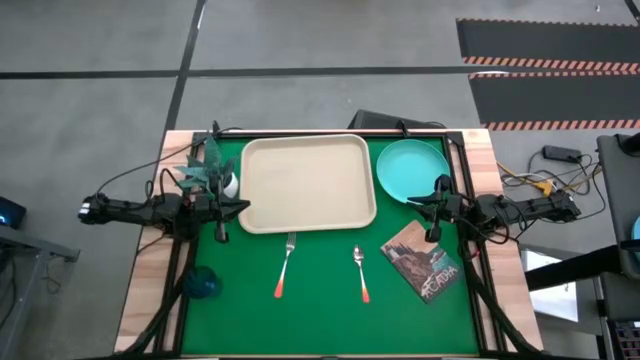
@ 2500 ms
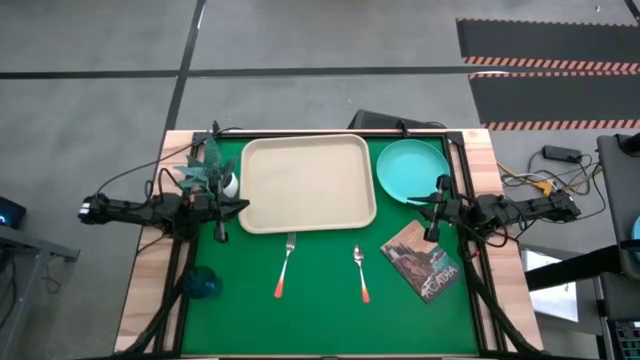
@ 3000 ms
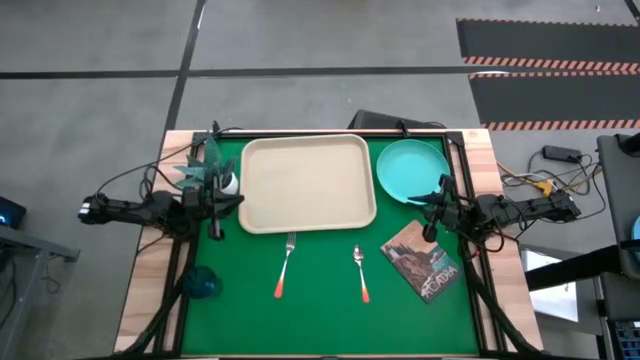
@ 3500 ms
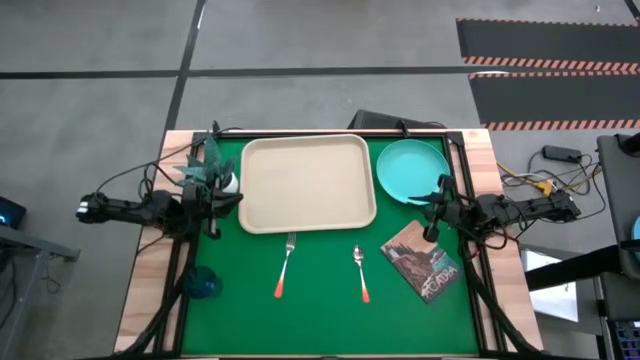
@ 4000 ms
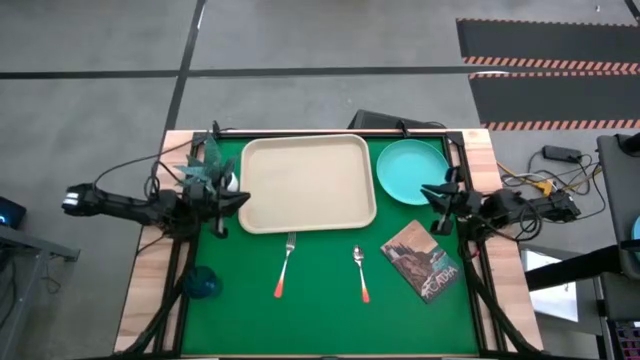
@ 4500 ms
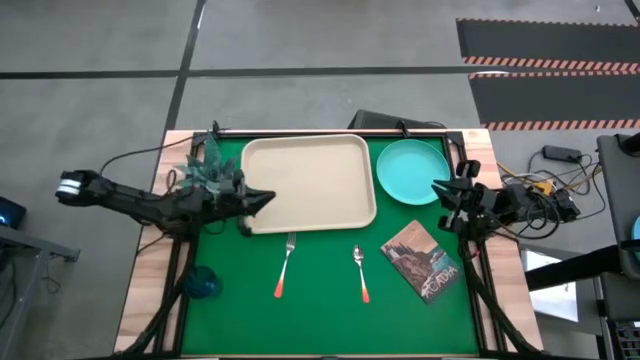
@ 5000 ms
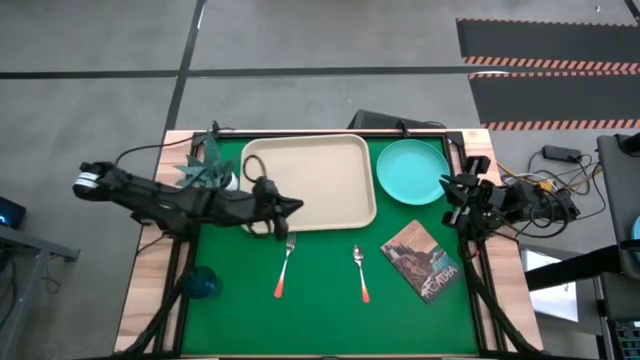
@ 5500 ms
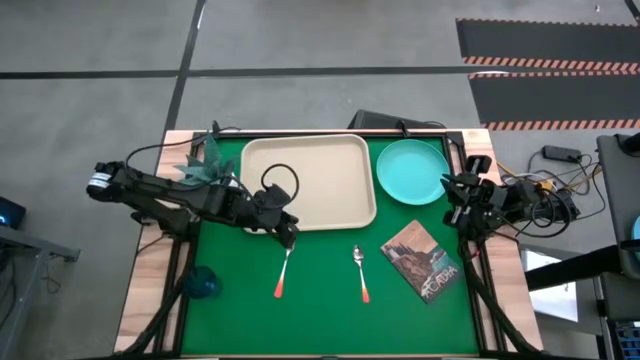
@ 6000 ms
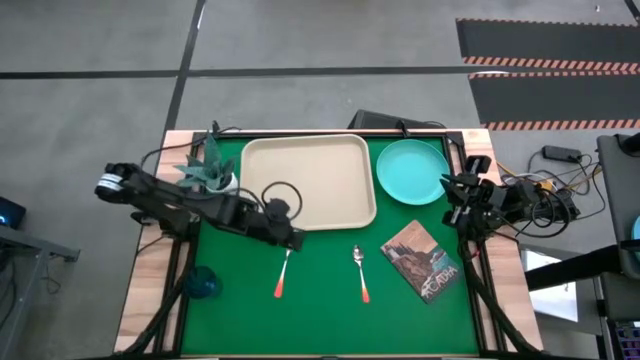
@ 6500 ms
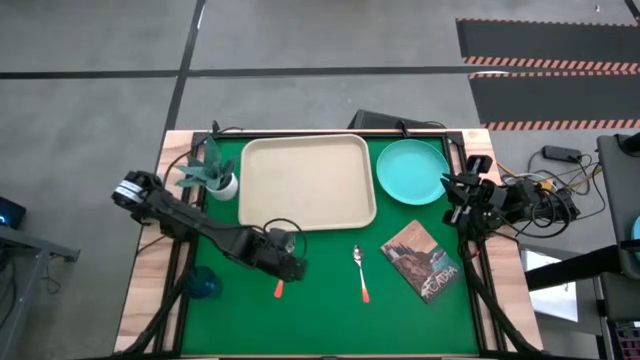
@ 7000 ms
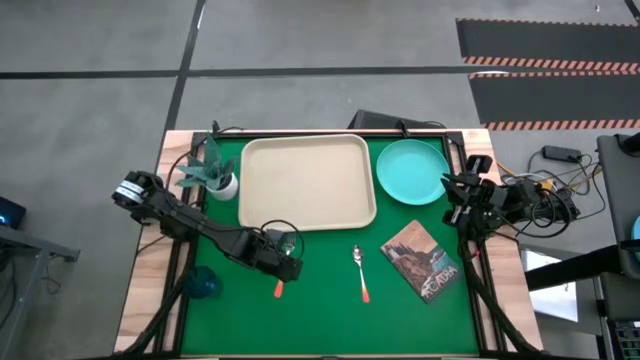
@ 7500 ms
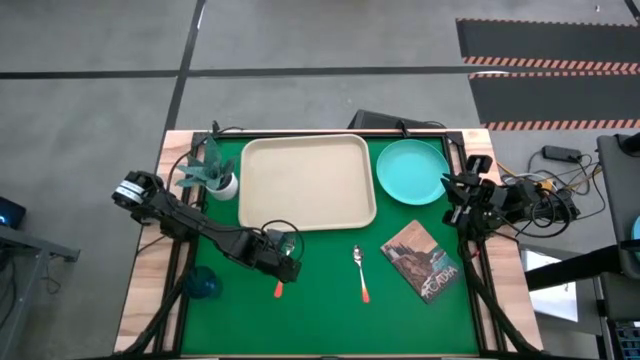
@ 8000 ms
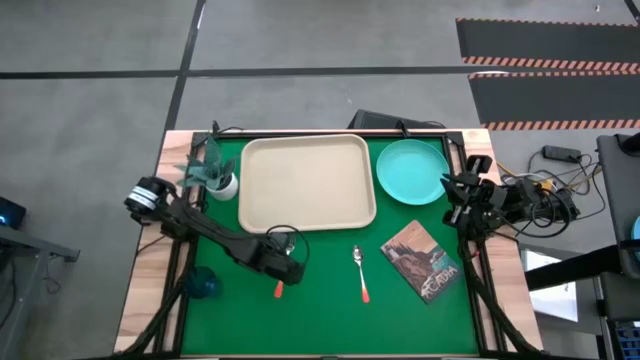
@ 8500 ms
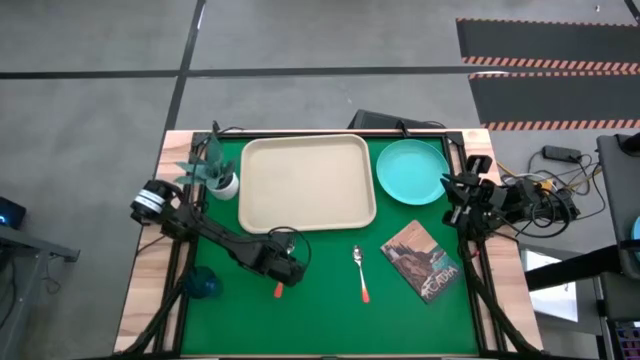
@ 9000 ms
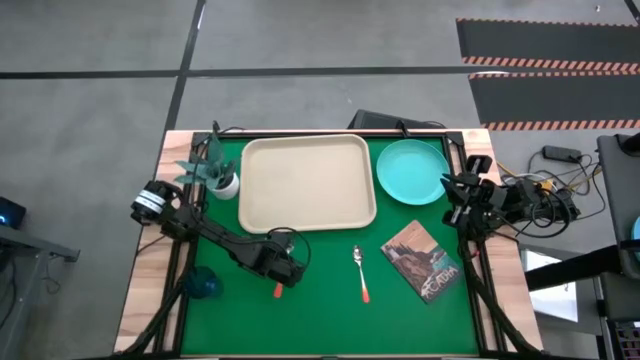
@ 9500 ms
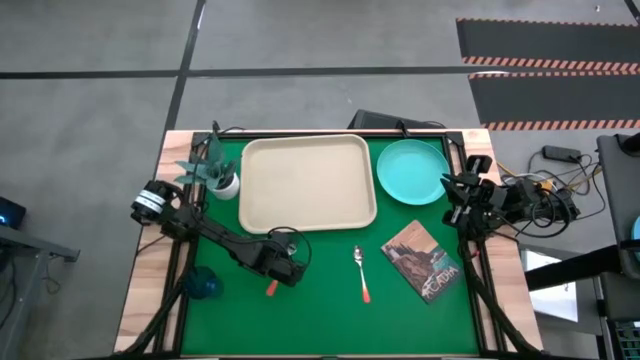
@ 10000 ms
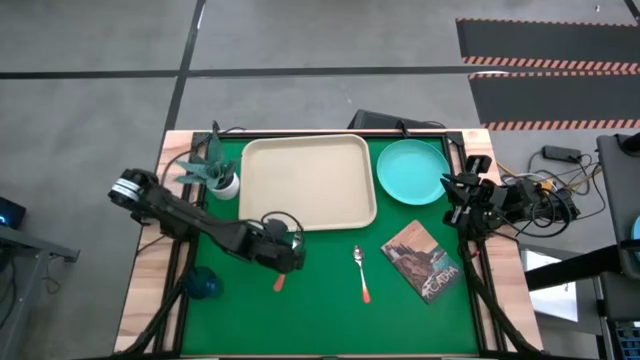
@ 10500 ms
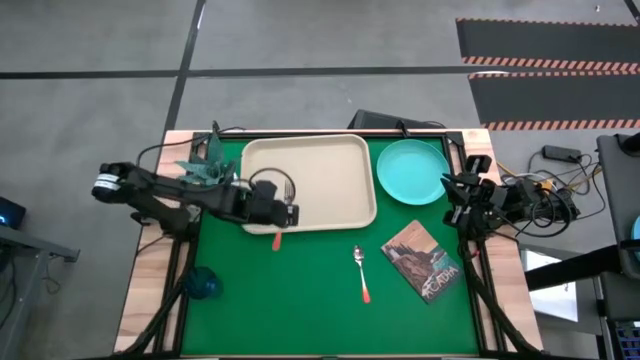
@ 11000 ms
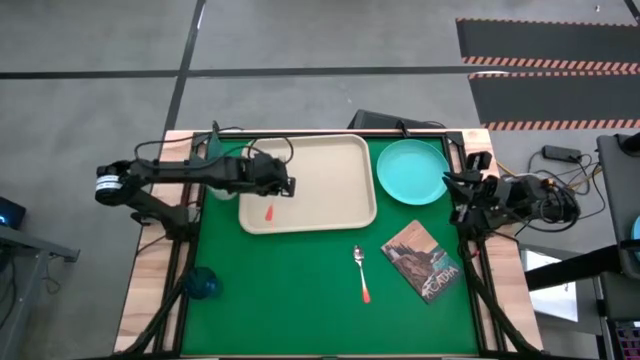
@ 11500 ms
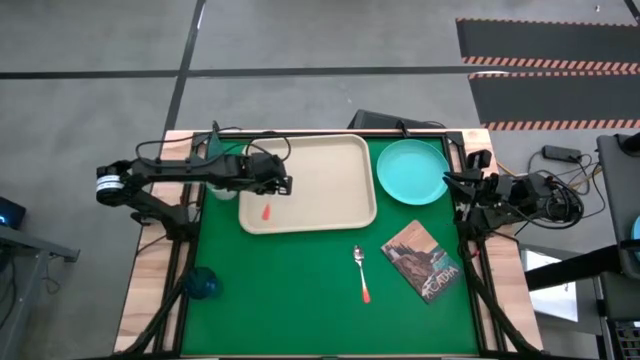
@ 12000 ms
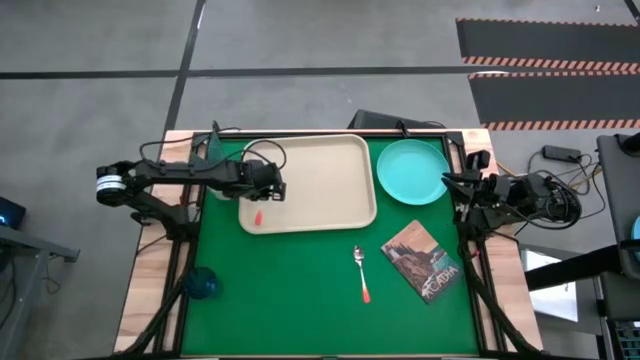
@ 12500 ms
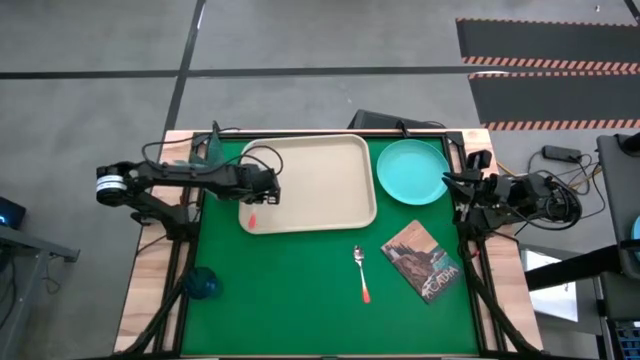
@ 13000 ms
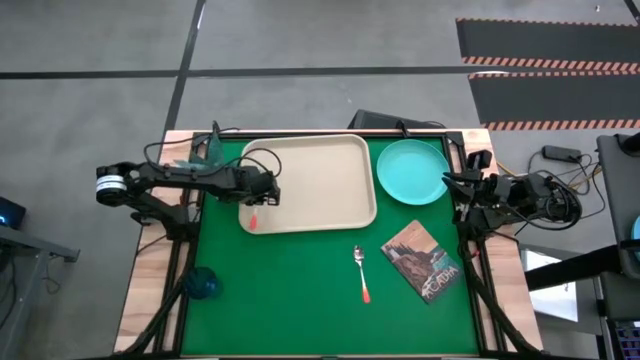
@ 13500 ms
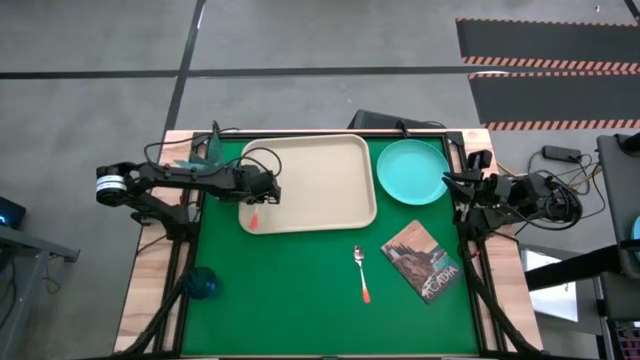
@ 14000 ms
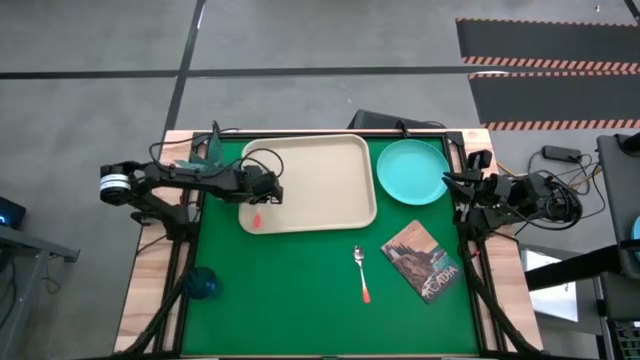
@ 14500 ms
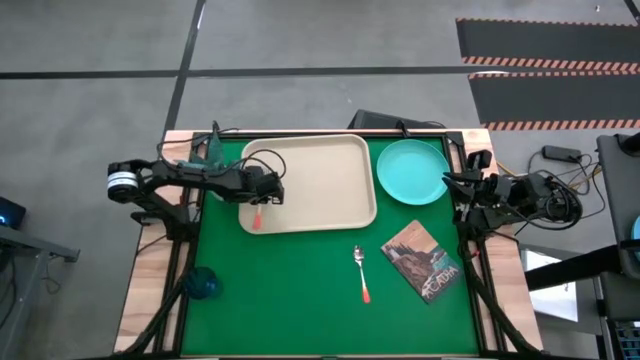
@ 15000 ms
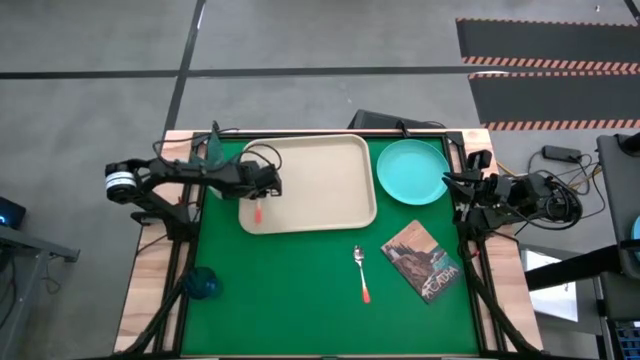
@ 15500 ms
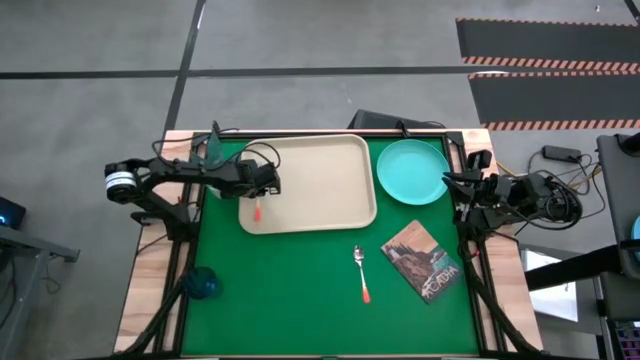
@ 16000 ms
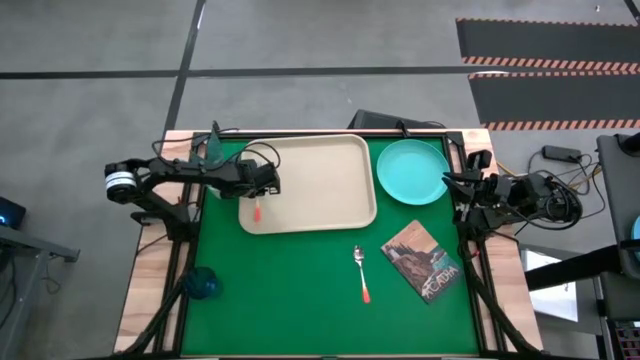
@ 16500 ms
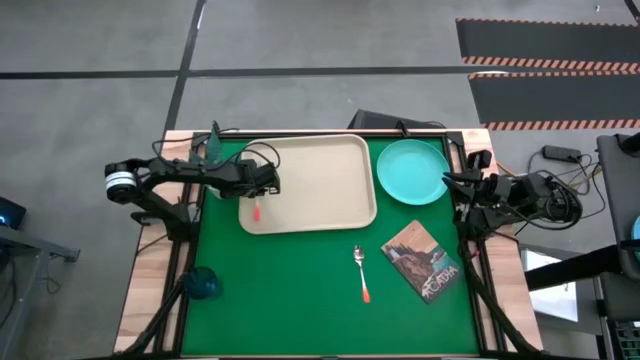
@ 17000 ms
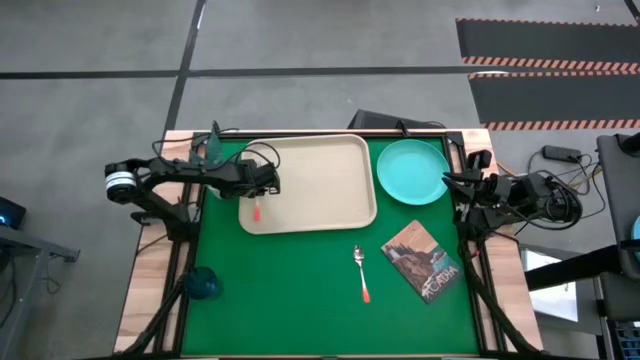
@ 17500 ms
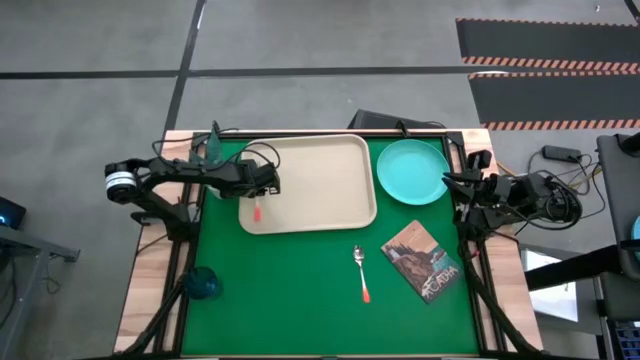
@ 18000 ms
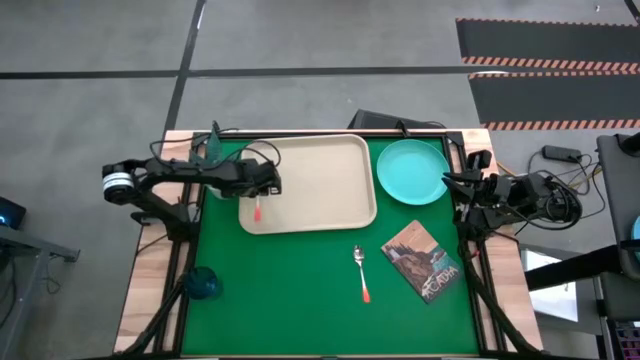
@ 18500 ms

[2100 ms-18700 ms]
Task: Pick and place plate/cup/fork/spoon on tray
Put the orange fork on the white tray

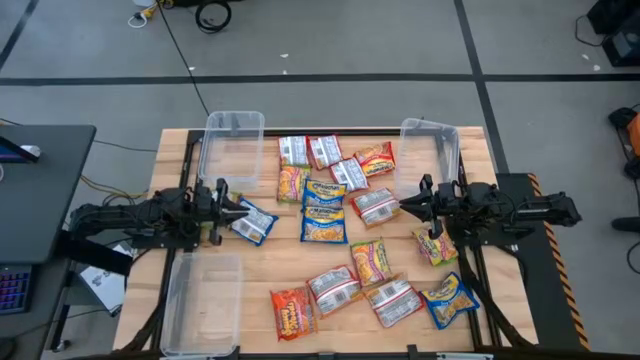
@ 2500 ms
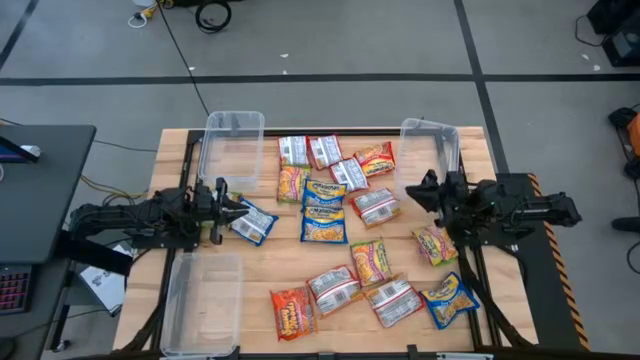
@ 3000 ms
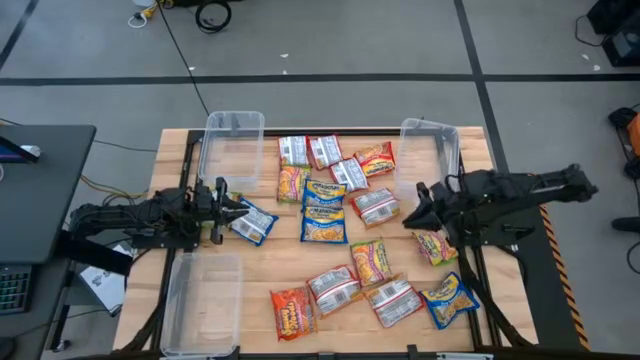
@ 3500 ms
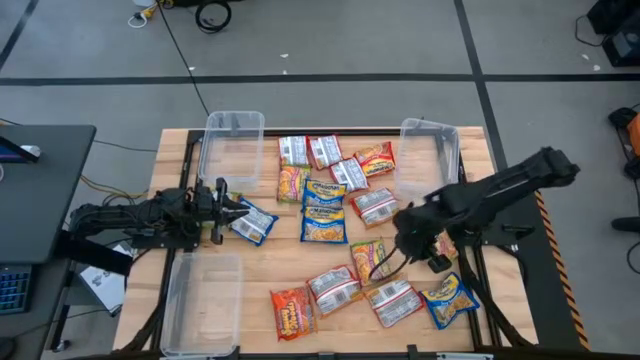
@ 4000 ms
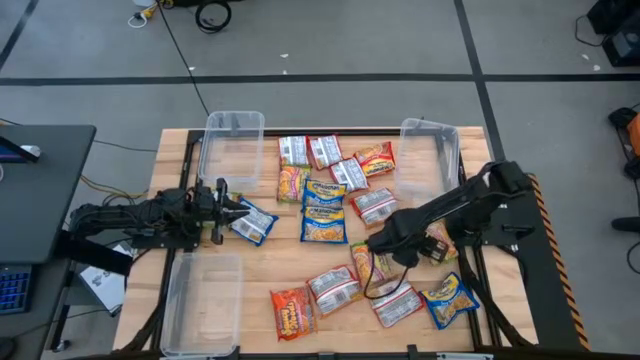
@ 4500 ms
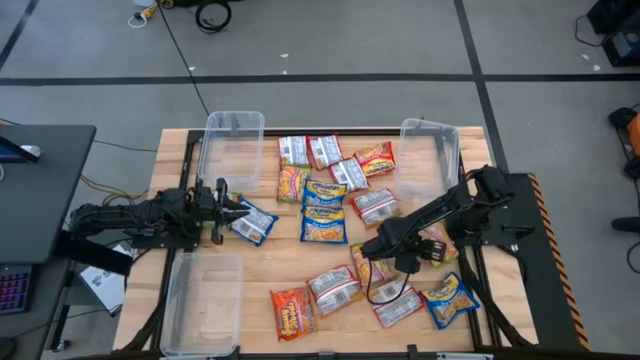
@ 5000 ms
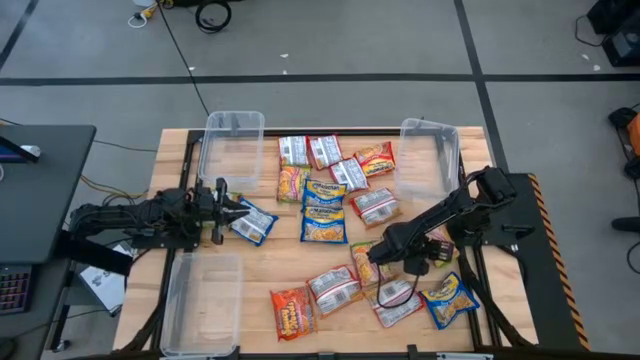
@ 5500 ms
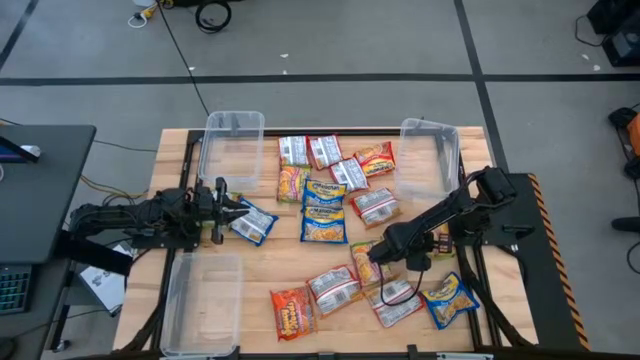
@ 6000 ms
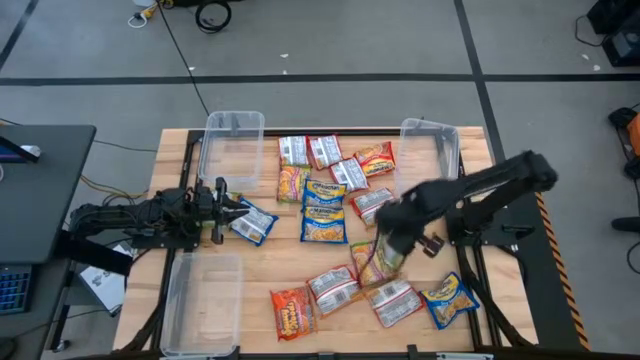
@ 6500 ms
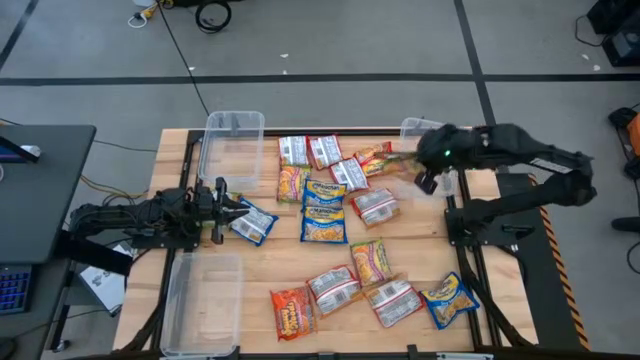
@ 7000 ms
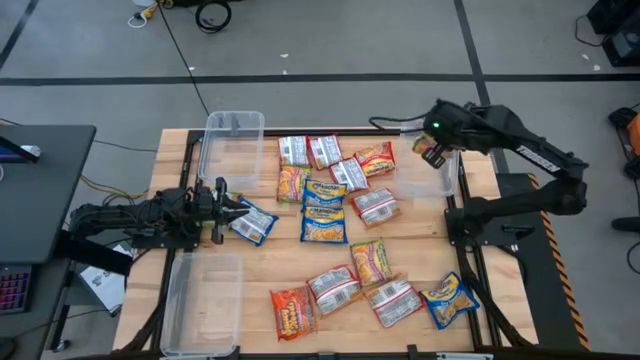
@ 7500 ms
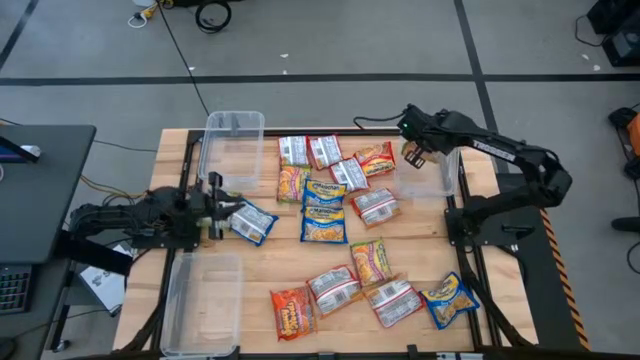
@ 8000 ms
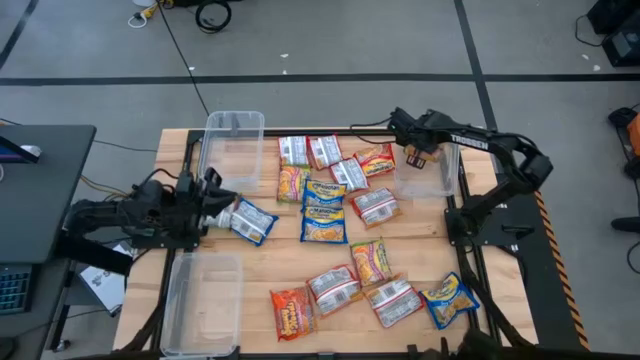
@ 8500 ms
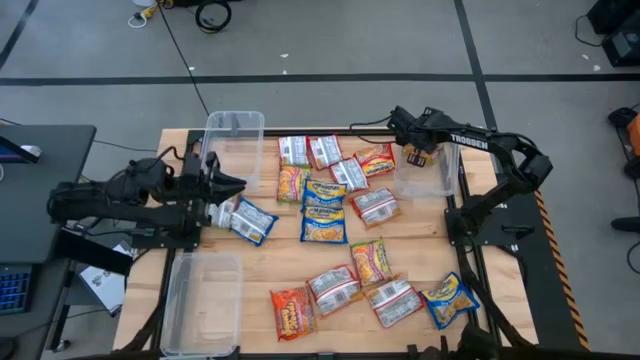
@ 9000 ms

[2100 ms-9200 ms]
Task: Sort Maruchan noodles
Put the green noodle pack into the top right transparent bin
